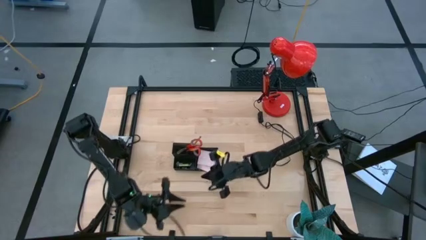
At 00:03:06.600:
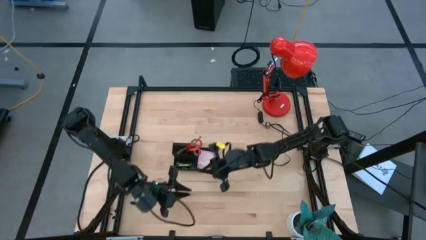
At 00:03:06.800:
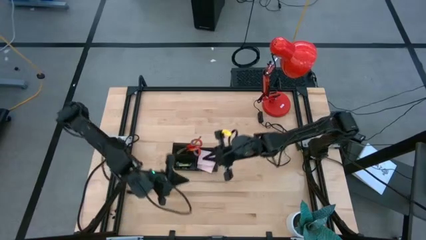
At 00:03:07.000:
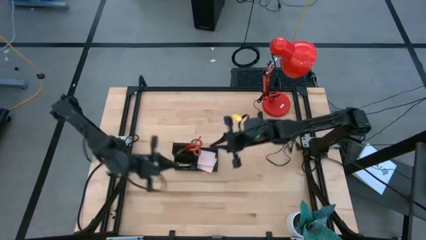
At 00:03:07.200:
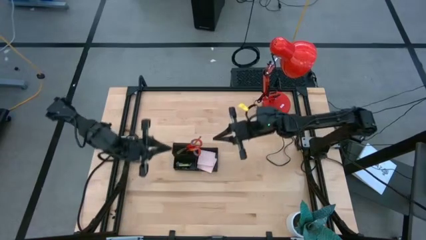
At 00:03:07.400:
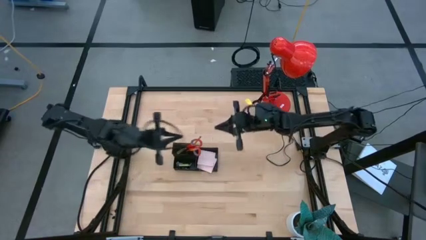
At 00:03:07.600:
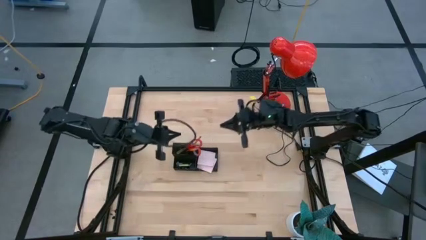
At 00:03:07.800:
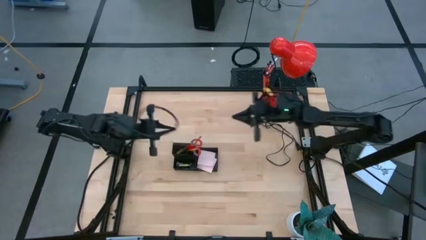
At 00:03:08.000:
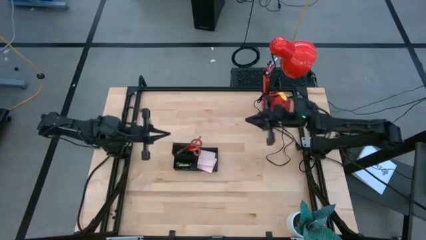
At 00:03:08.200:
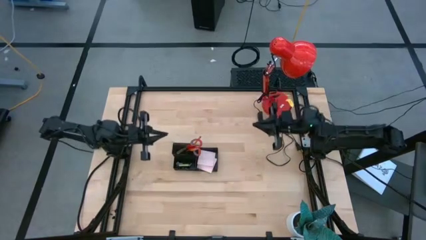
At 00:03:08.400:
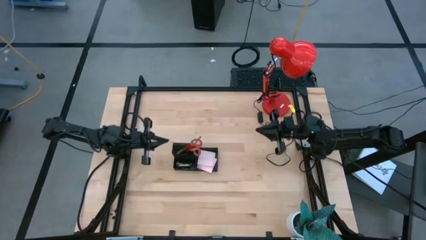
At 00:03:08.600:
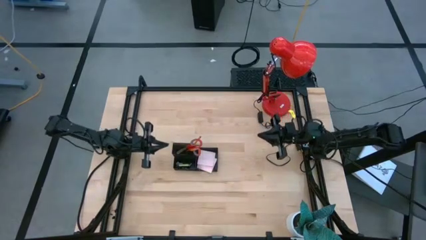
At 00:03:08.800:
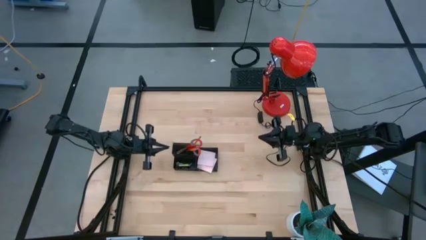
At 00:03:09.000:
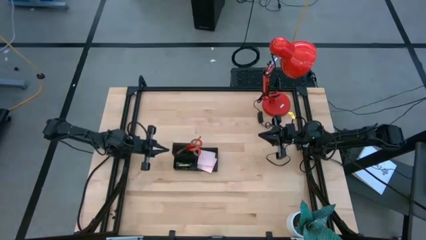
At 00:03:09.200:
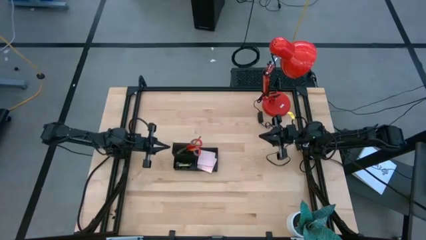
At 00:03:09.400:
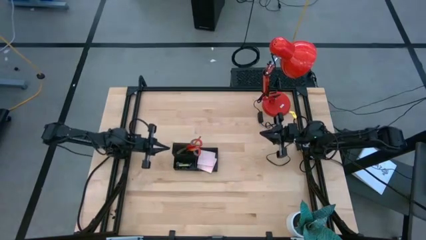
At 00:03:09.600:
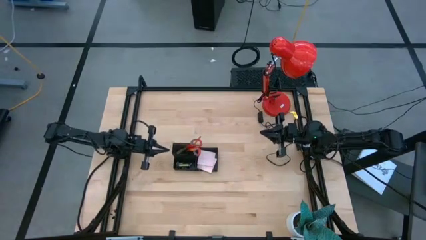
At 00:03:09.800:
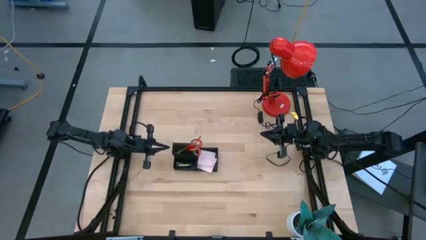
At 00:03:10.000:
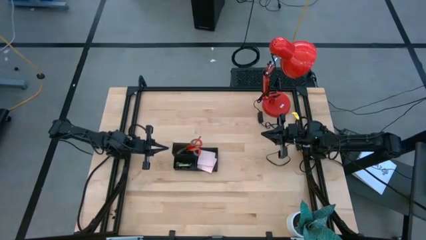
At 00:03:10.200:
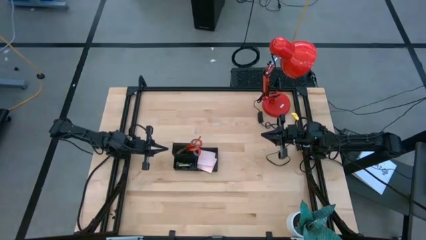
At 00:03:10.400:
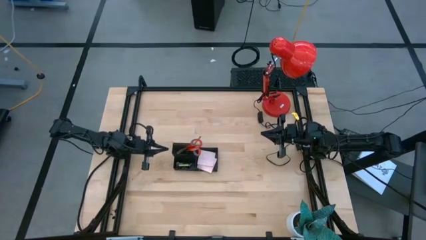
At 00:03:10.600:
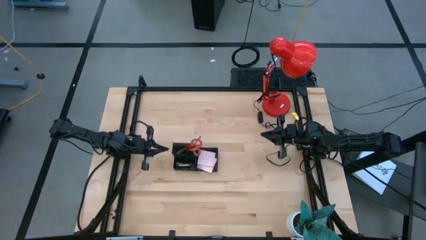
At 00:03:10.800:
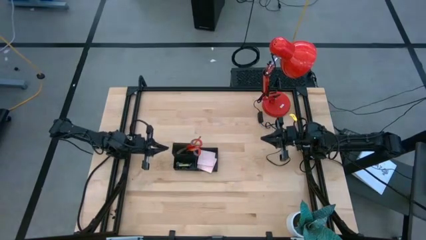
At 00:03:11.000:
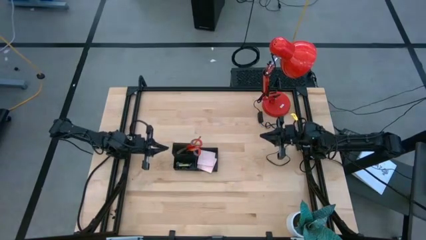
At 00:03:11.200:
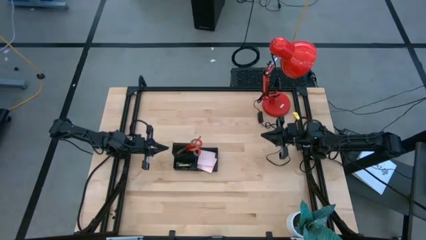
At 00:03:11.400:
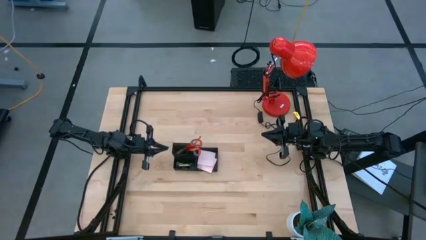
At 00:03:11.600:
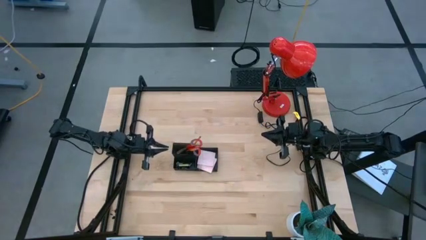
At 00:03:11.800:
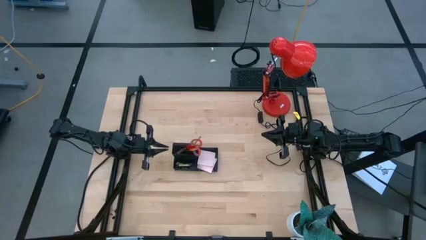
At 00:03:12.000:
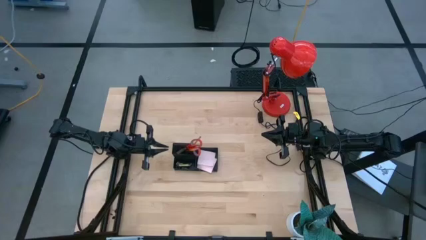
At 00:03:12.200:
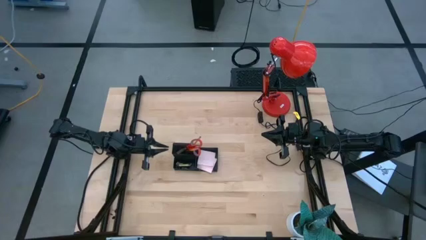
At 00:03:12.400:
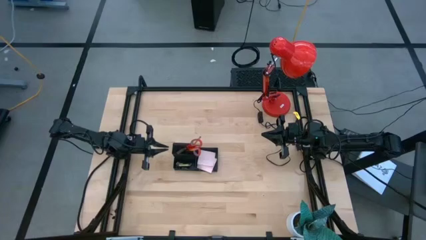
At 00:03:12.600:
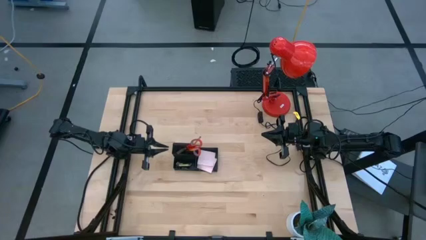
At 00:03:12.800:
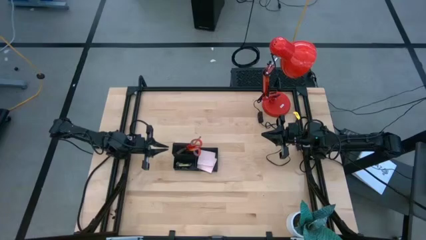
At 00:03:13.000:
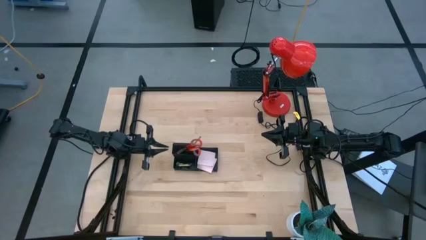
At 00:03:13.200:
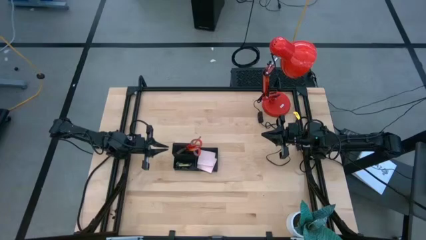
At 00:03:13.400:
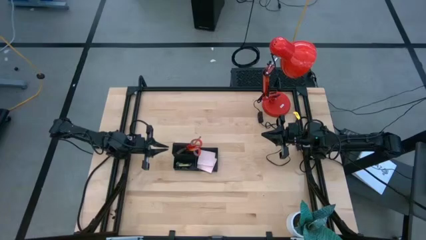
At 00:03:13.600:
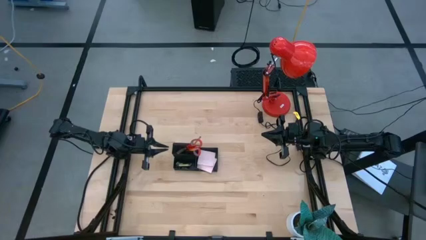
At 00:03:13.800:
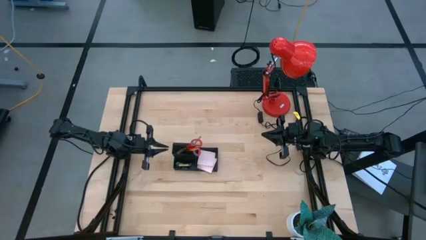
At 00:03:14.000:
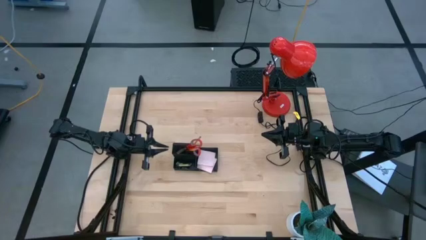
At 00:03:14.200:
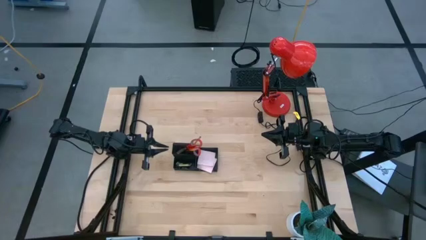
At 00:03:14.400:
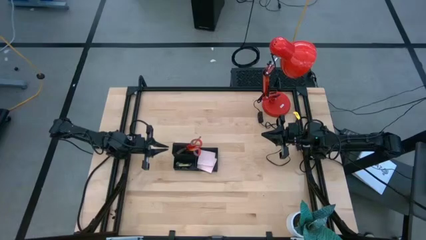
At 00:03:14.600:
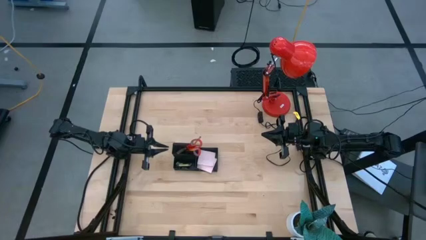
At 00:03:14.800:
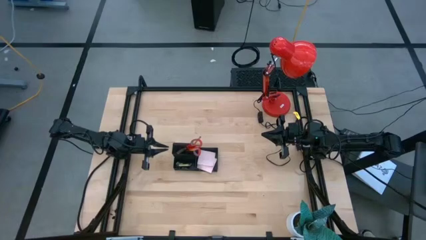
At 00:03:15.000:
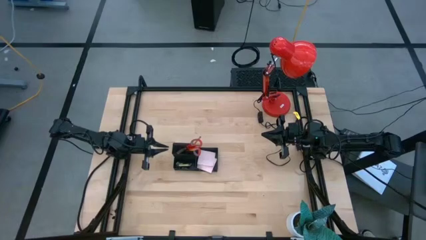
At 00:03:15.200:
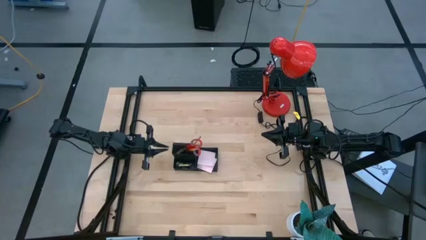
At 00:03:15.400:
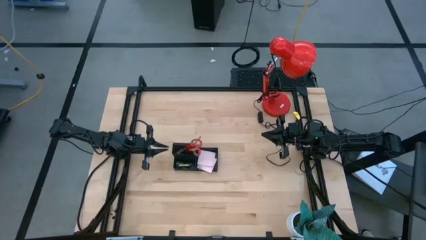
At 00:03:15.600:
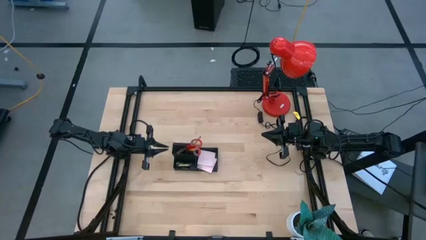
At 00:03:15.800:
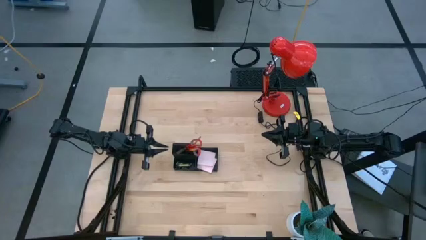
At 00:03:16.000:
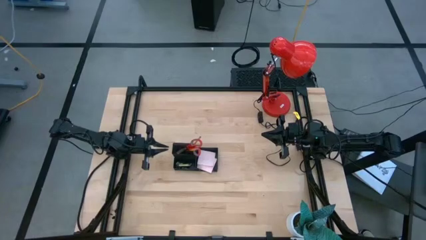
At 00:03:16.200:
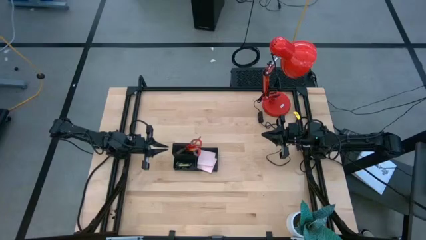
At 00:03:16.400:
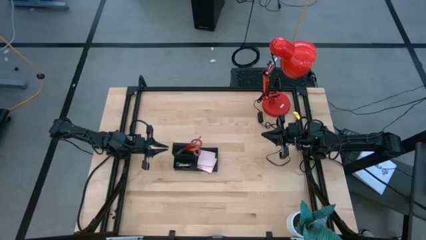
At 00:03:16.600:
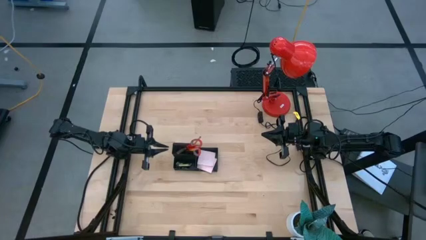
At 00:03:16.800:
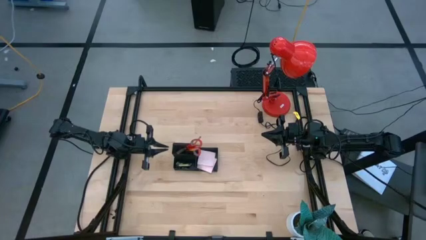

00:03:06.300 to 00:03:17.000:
Task: Pick and place office supplies into organizer
Return to Home Position
